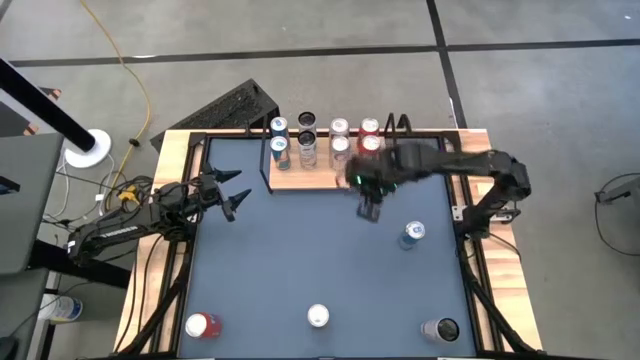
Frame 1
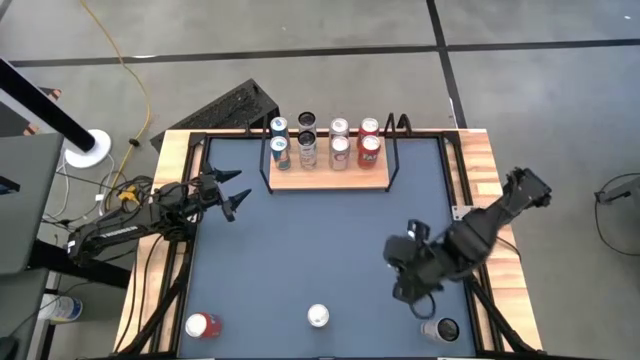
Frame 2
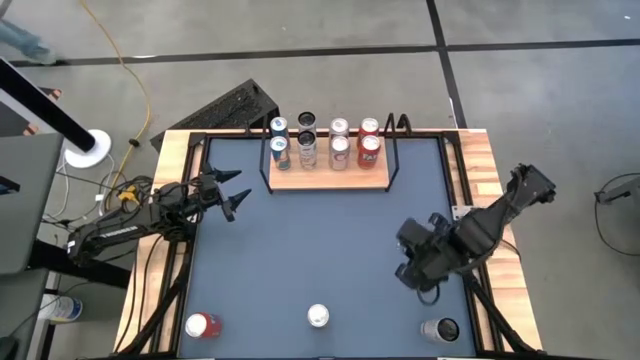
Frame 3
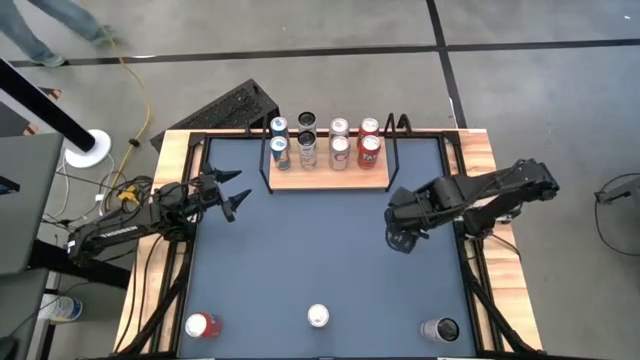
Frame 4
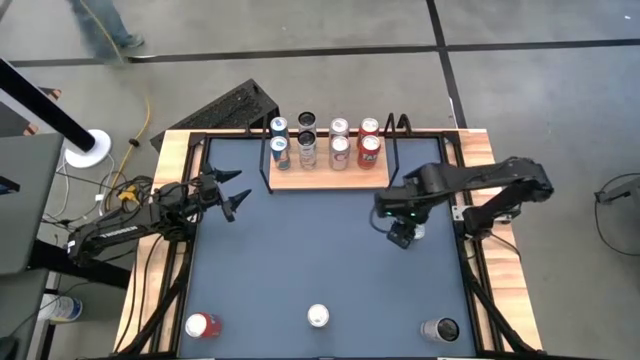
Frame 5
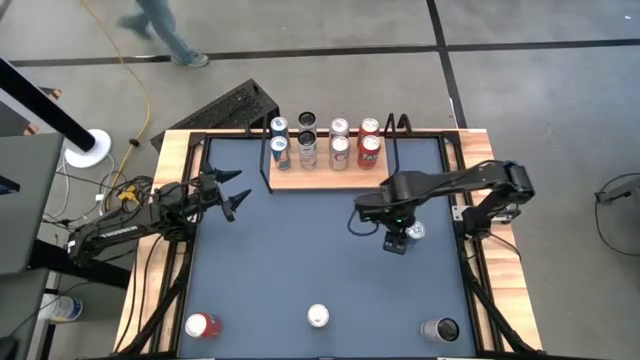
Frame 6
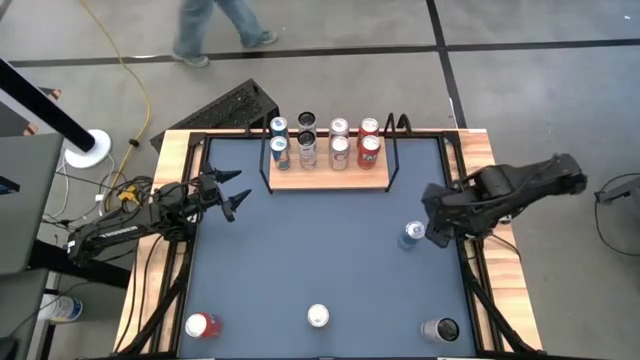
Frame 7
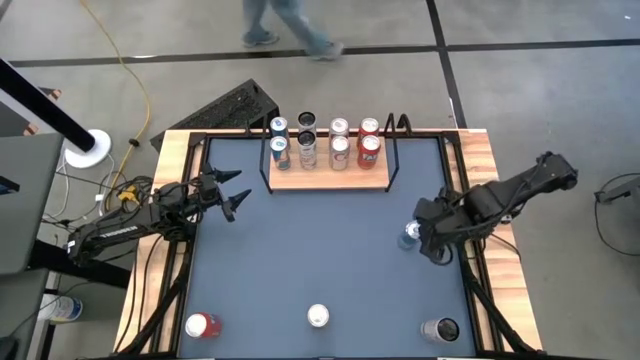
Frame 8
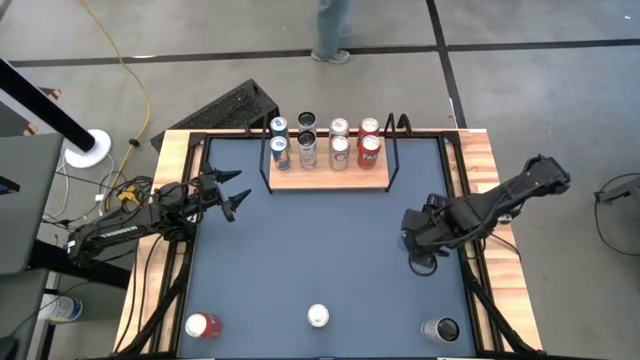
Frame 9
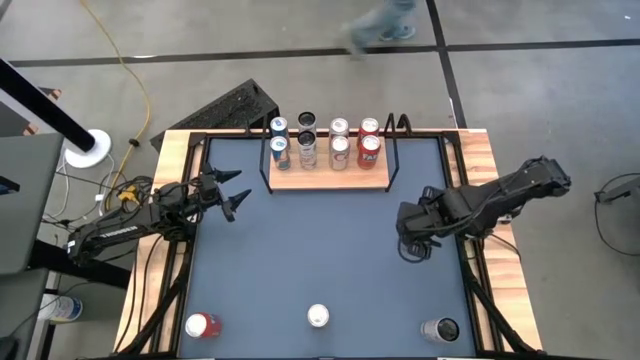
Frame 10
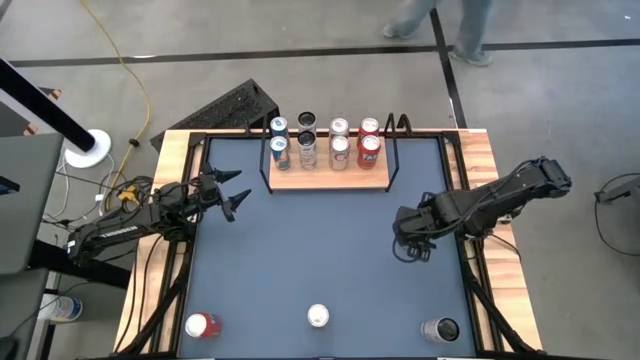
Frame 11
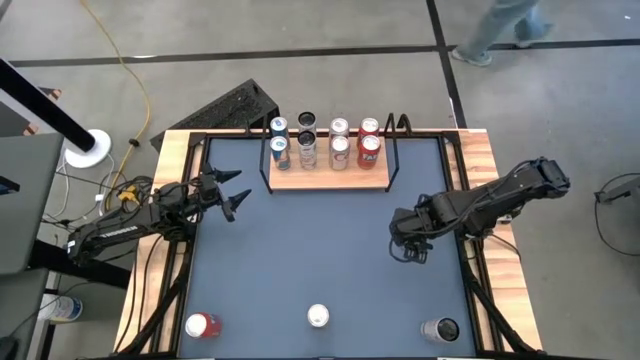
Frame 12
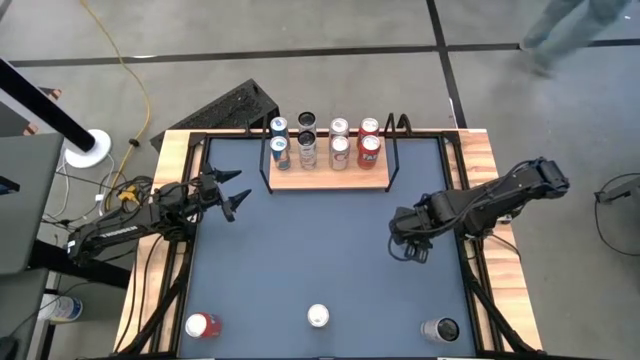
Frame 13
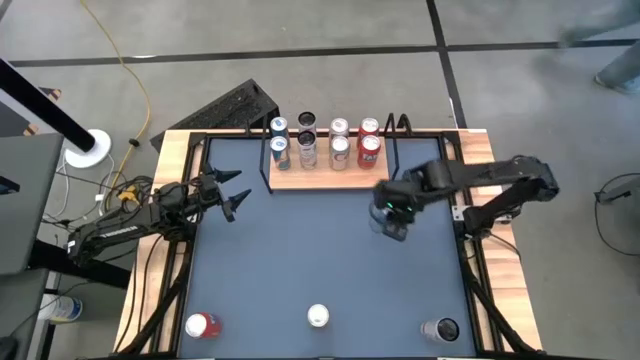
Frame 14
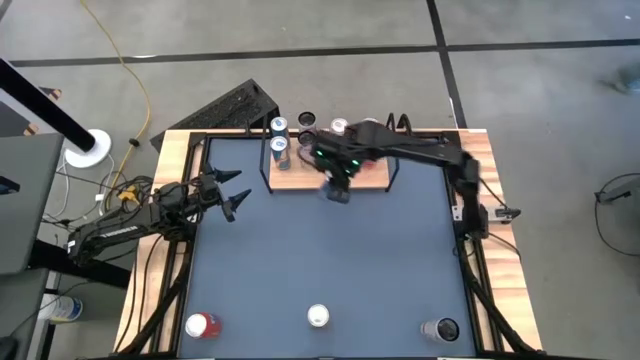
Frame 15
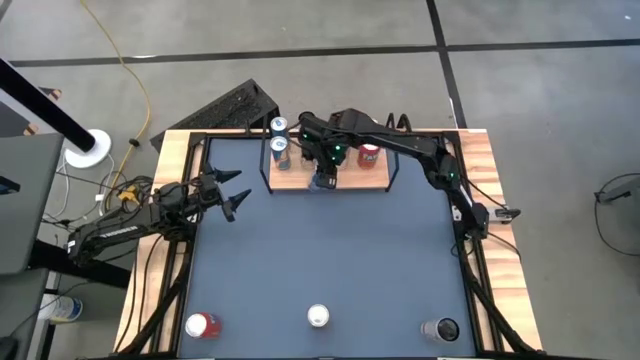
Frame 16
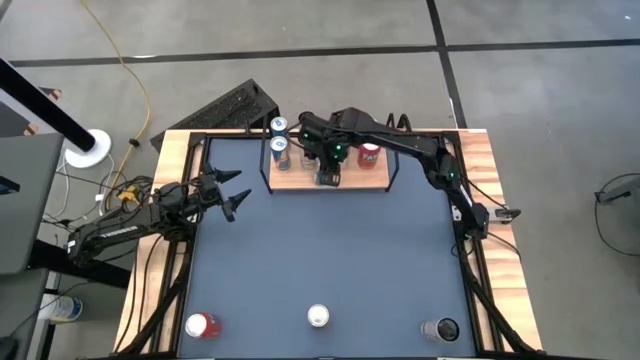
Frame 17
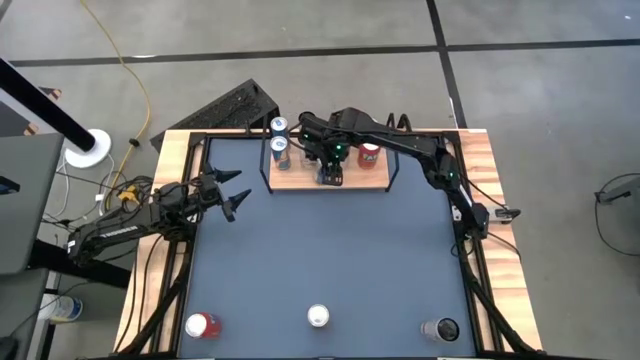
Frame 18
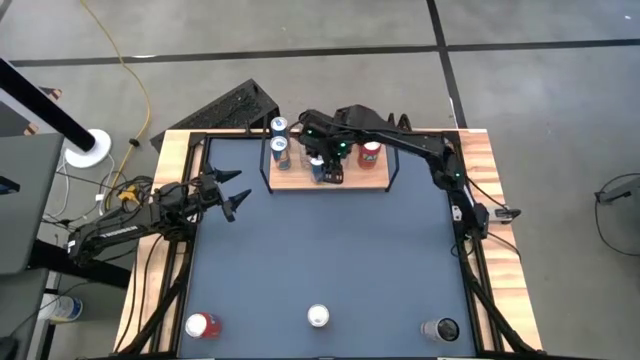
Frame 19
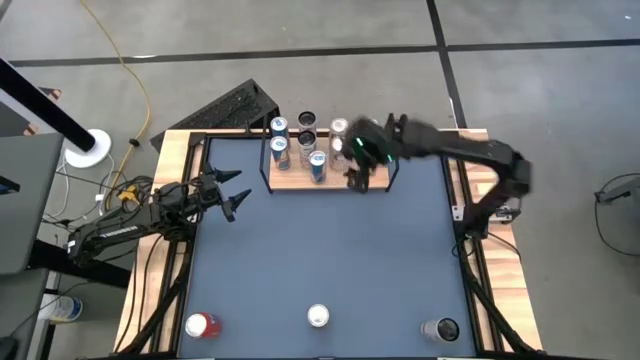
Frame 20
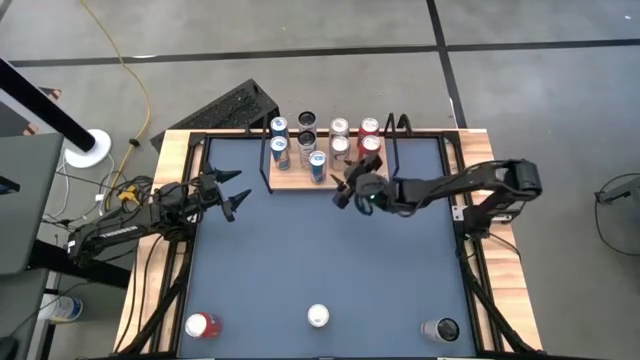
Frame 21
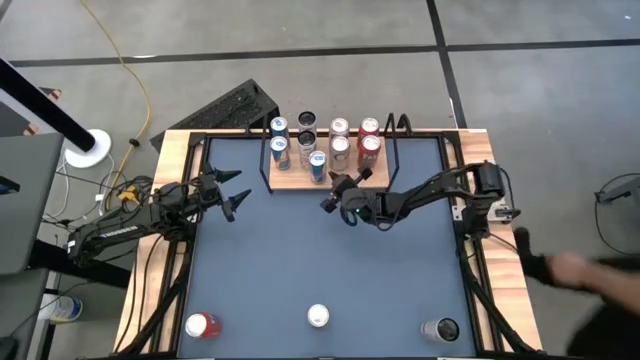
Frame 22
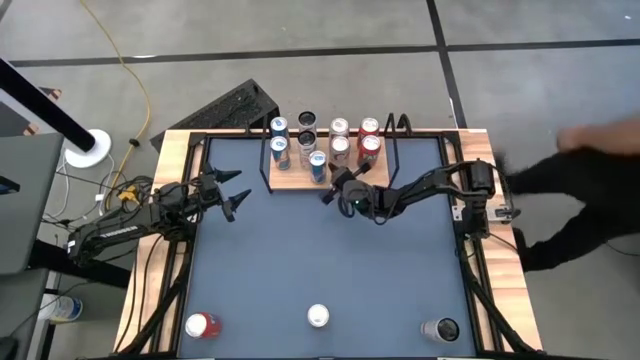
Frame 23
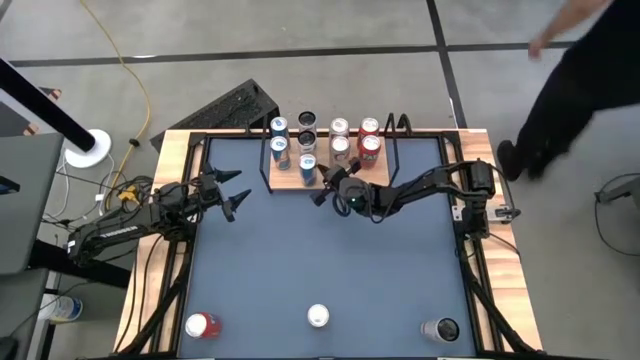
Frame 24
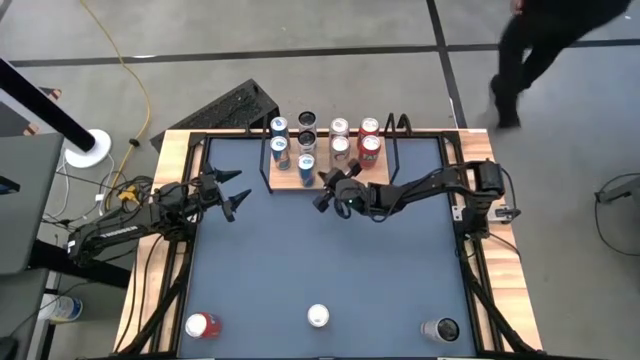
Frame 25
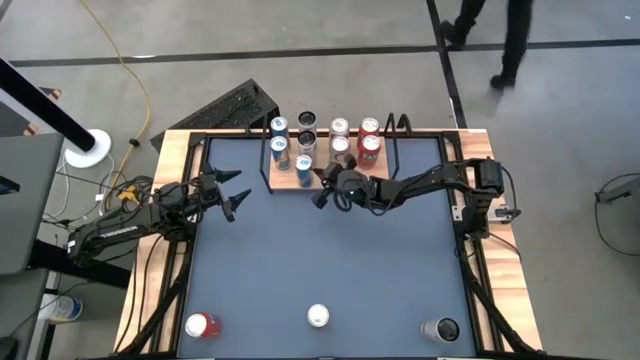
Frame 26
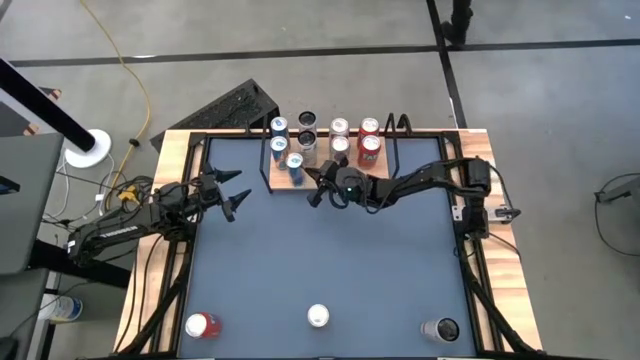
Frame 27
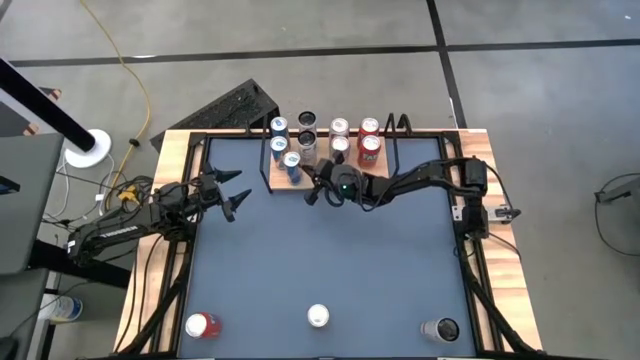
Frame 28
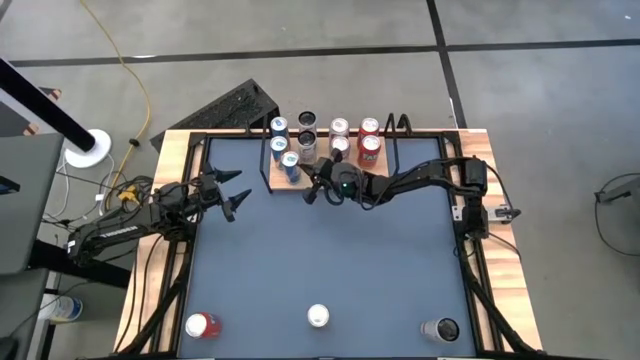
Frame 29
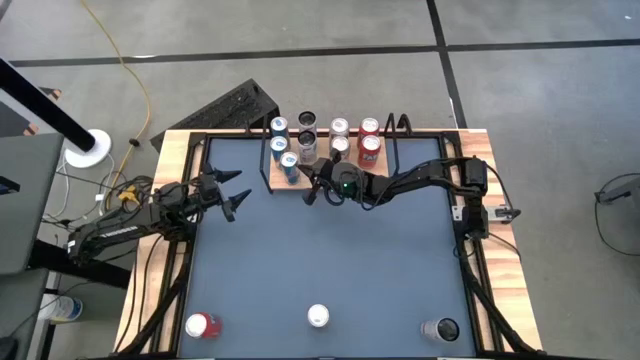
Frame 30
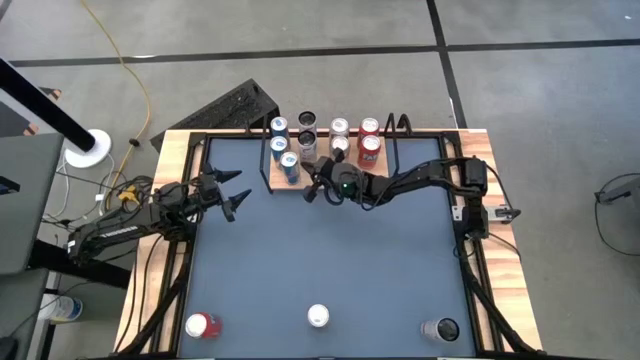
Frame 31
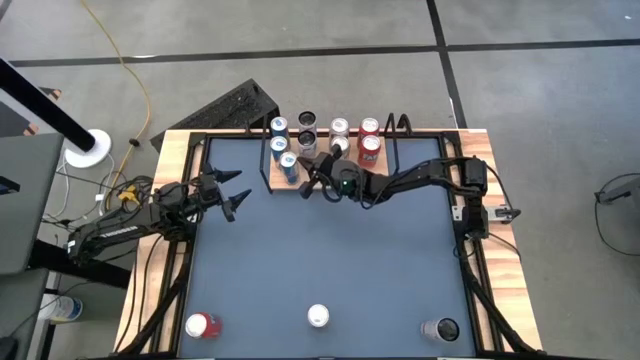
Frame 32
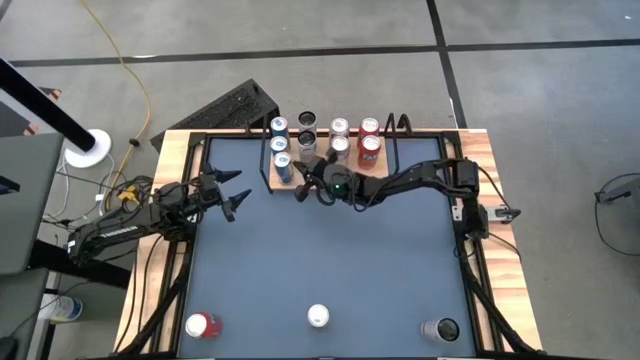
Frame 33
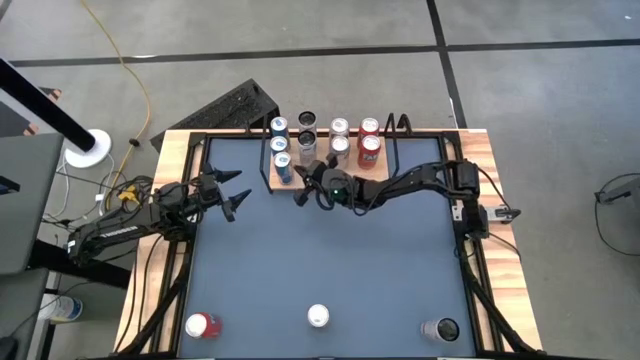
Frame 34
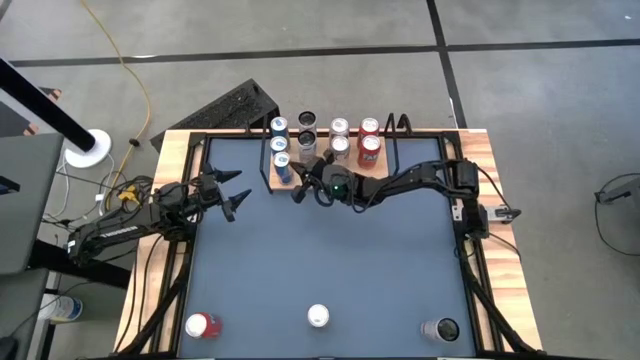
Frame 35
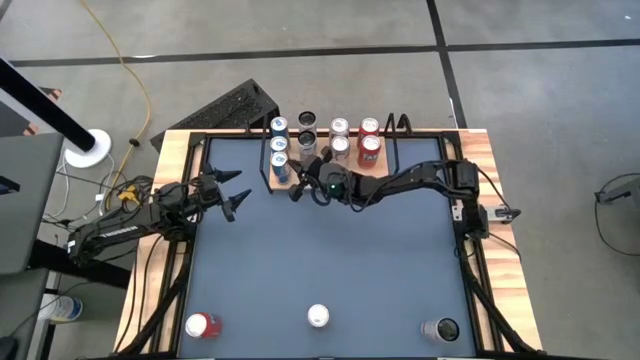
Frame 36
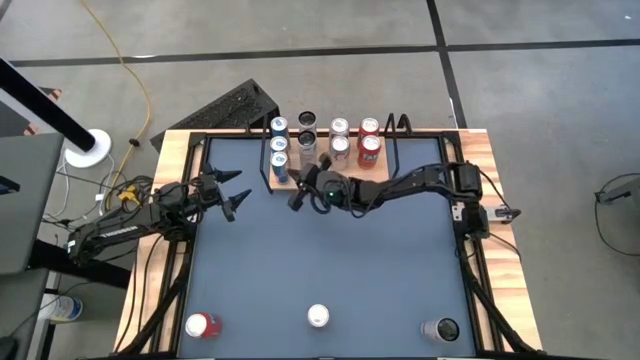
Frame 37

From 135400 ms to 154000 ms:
Task: Place canned beverage on shelf
Put the blue soda can onto the shelf aligned with the other blue soda cans

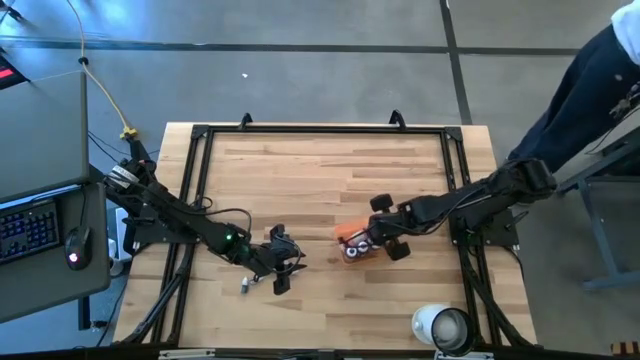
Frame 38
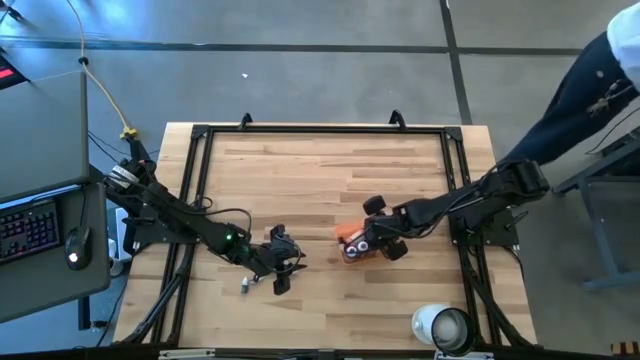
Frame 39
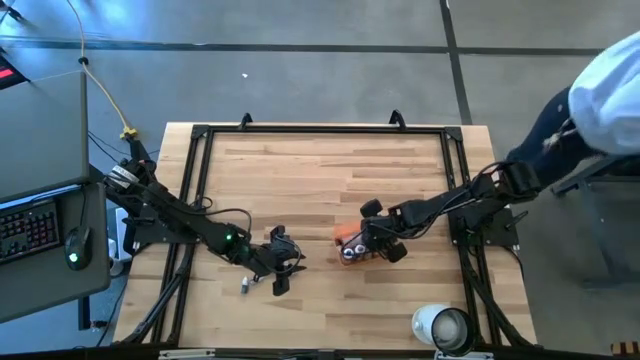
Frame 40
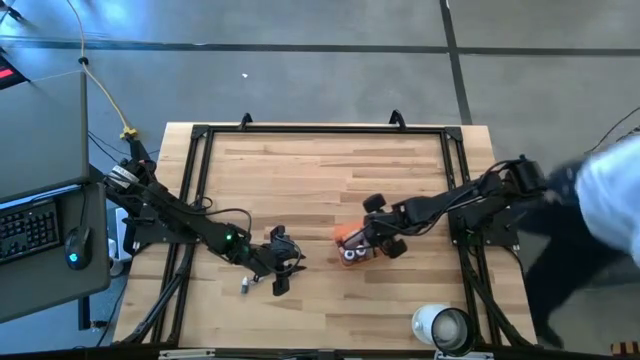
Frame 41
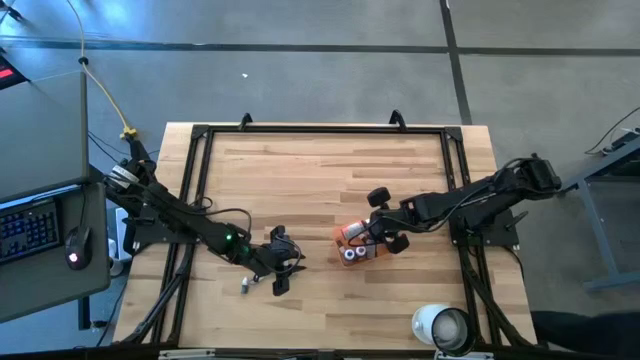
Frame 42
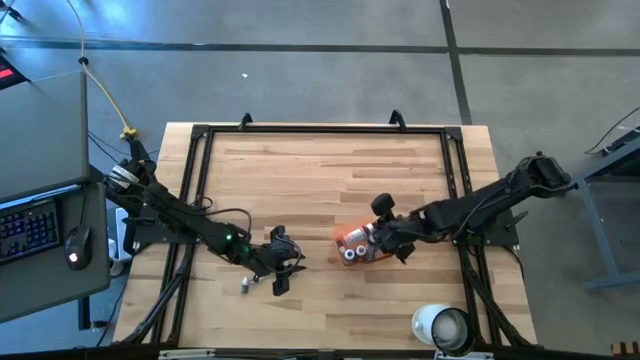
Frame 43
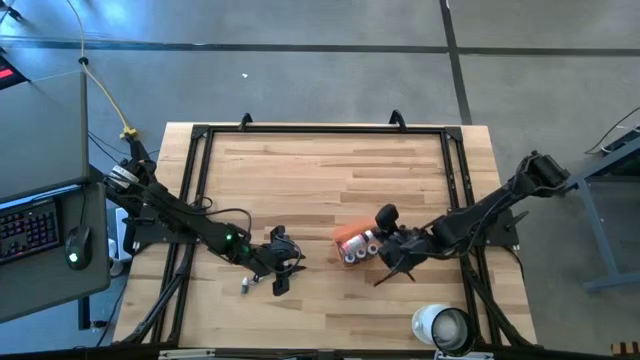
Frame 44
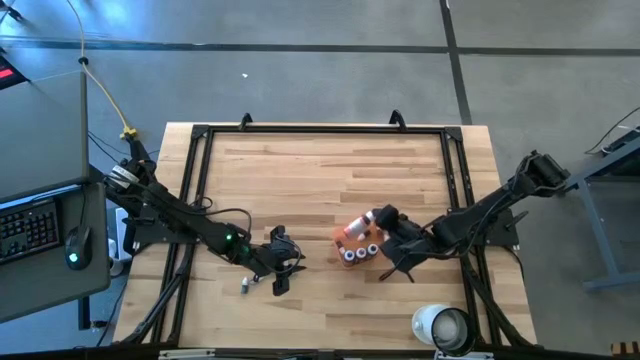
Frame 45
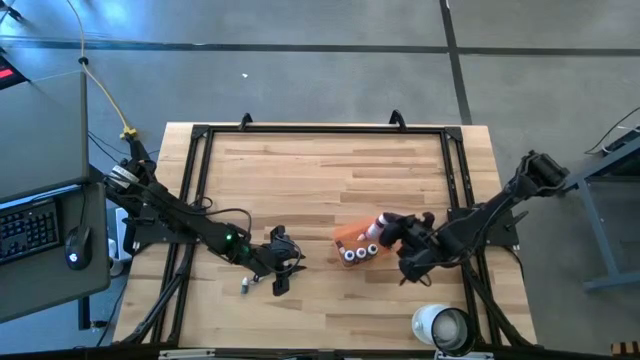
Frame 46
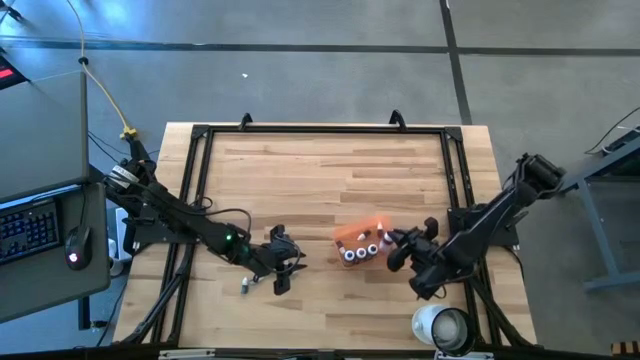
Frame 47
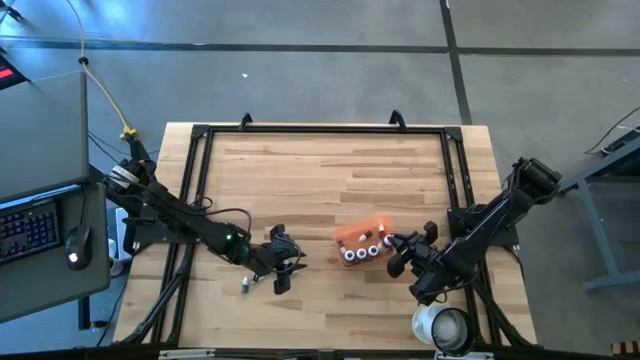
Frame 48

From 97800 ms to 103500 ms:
Task: Pick & Place food coloring
Adjust the large pink food coloring bottle in the orange bin
